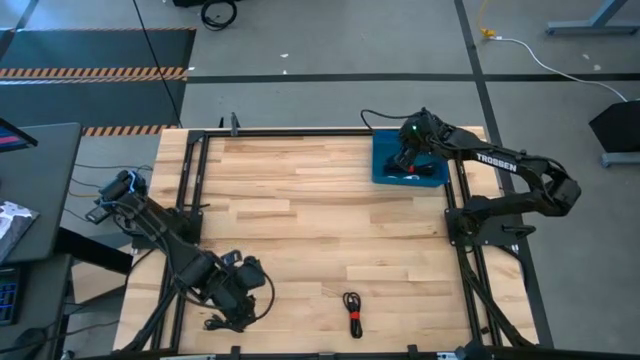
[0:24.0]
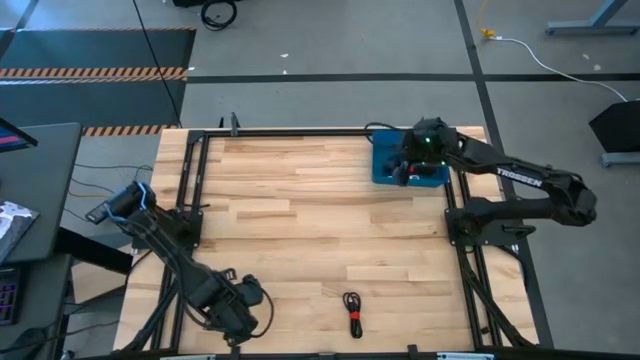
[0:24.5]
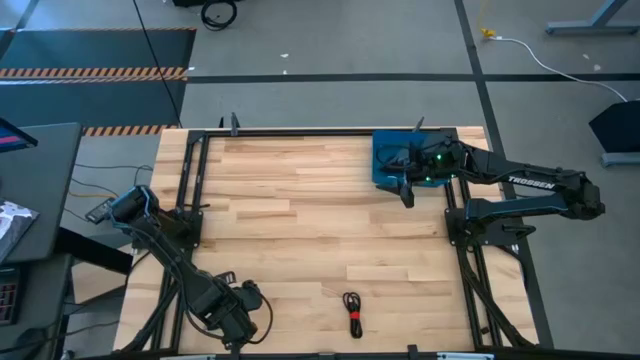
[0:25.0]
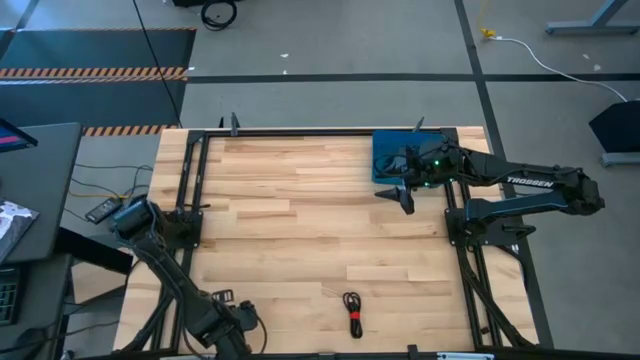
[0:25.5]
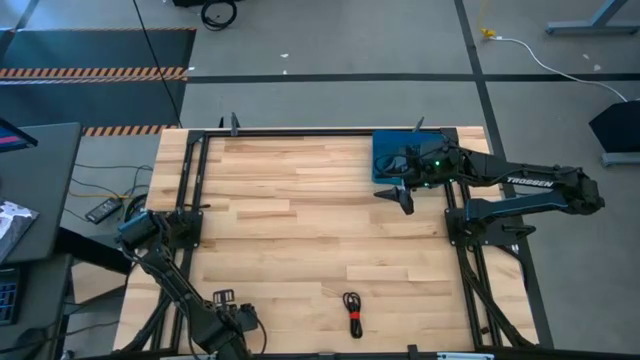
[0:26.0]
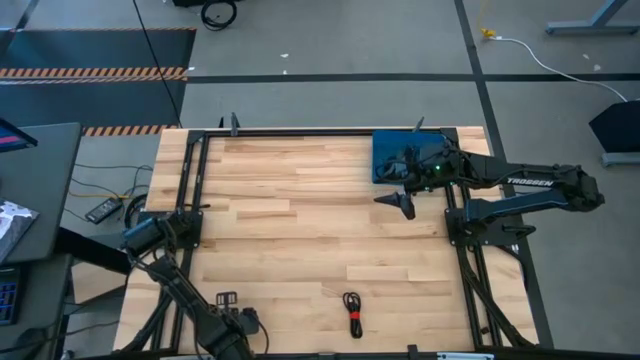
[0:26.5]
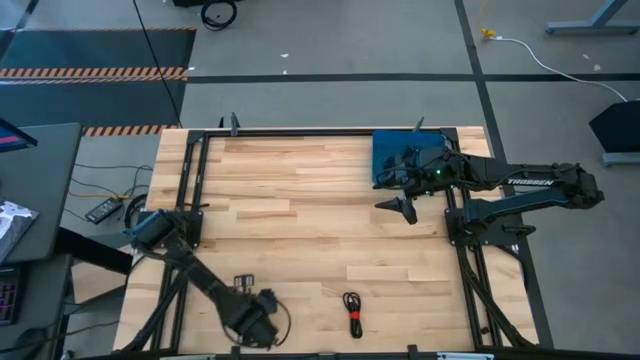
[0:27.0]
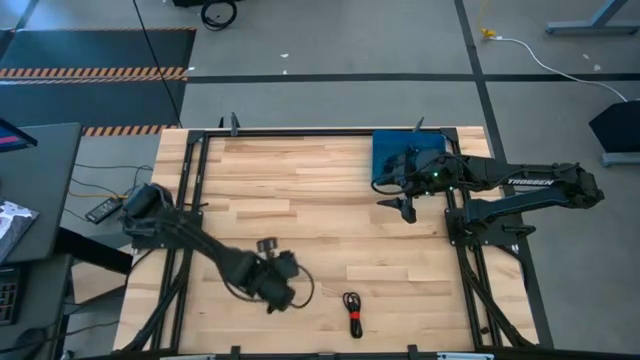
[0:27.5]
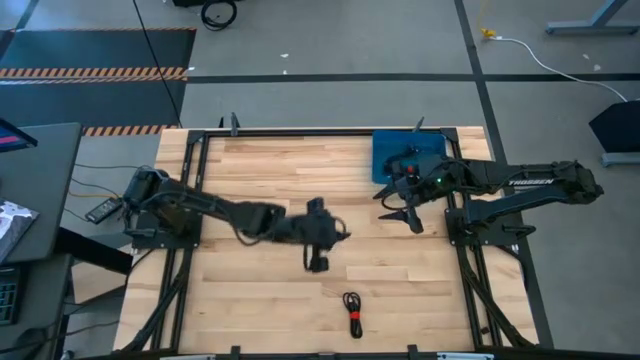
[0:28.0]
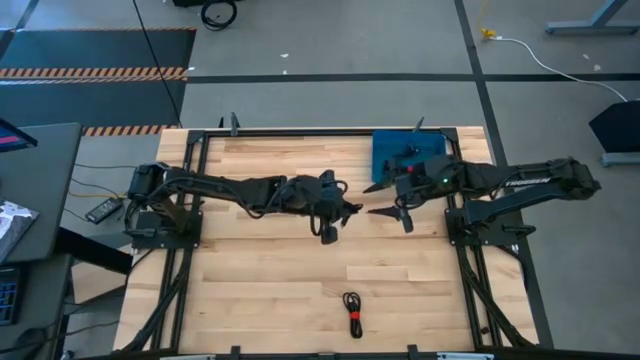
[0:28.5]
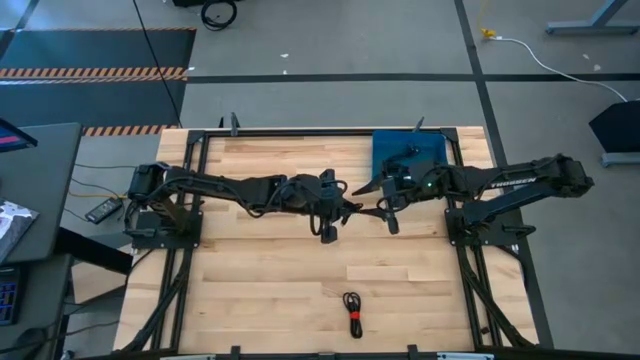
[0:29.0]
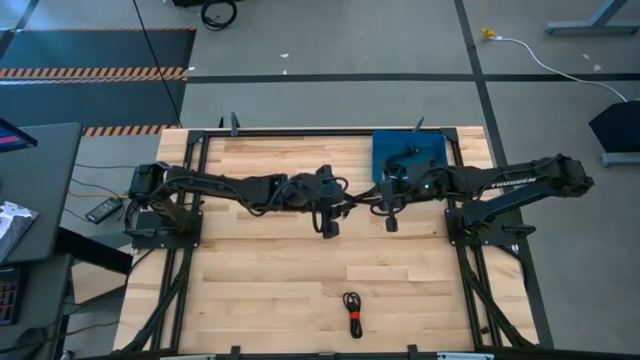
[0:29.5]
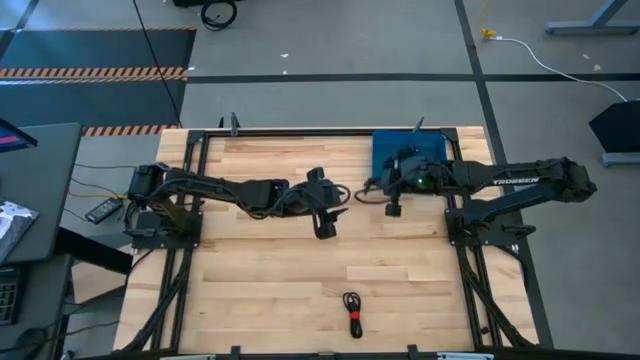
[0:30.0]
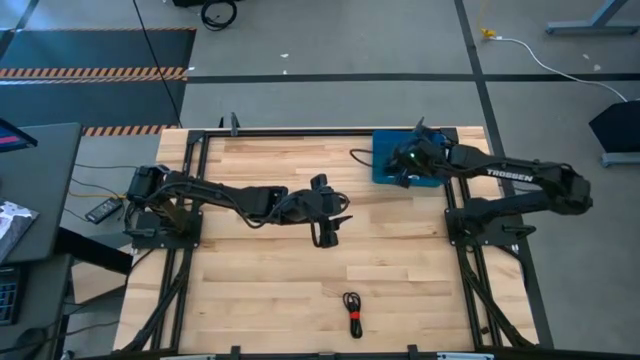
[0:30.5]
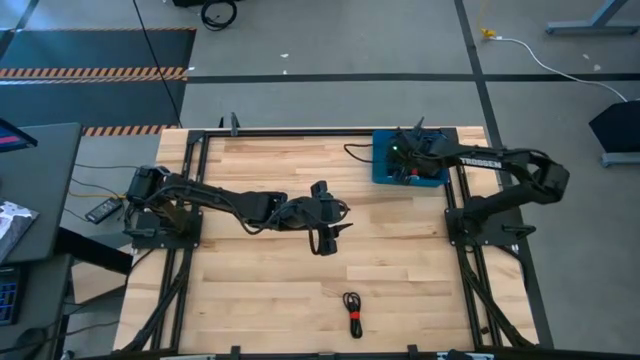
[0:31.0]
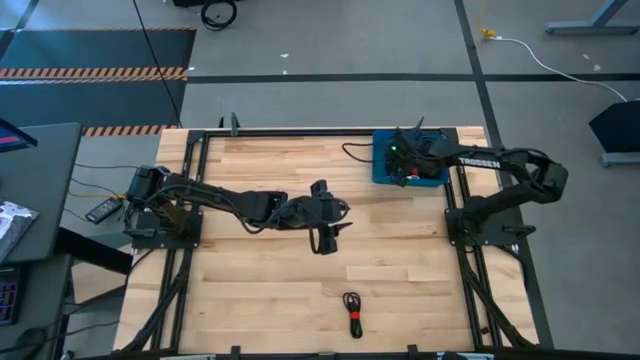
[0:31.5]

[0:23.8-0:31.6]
Task: Pick and place USB-C Cables
Put the black charger cable into the blue bin

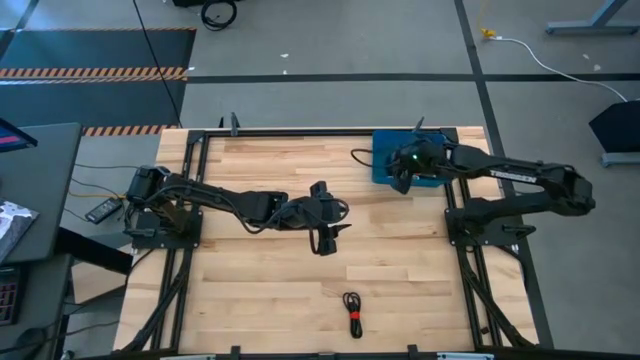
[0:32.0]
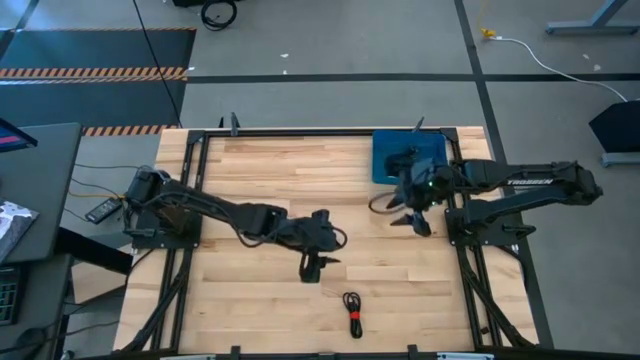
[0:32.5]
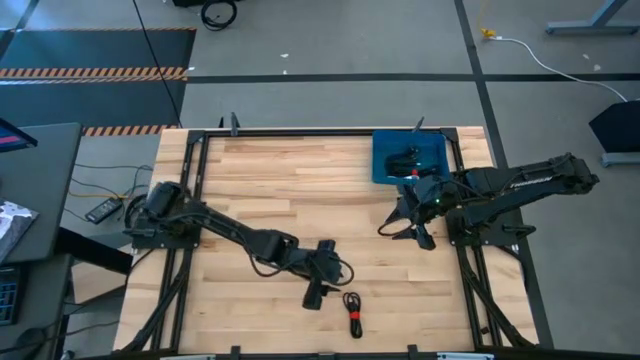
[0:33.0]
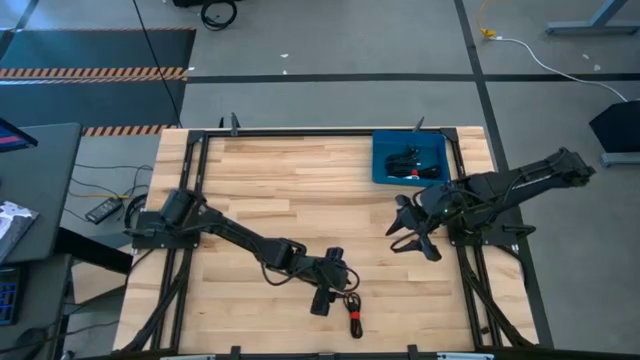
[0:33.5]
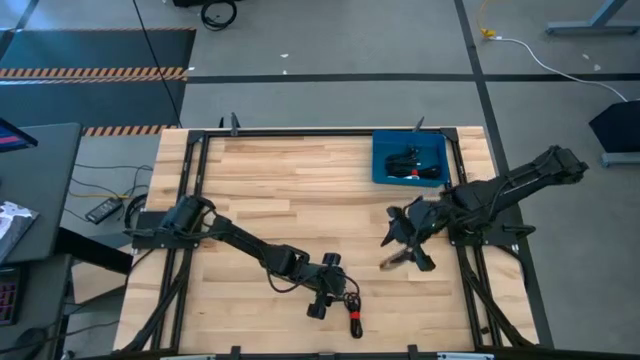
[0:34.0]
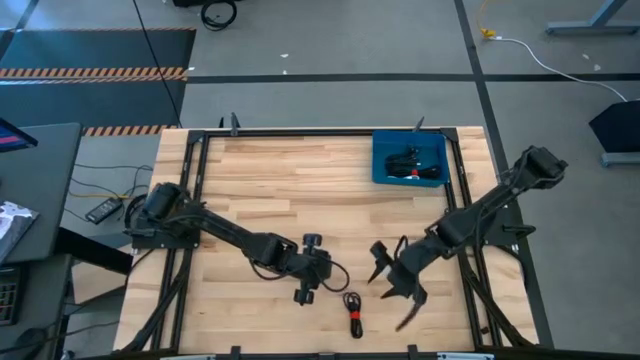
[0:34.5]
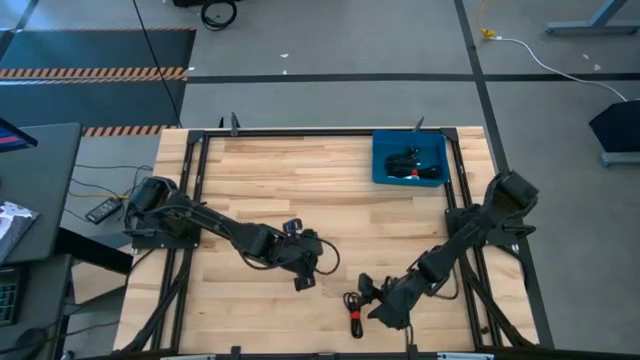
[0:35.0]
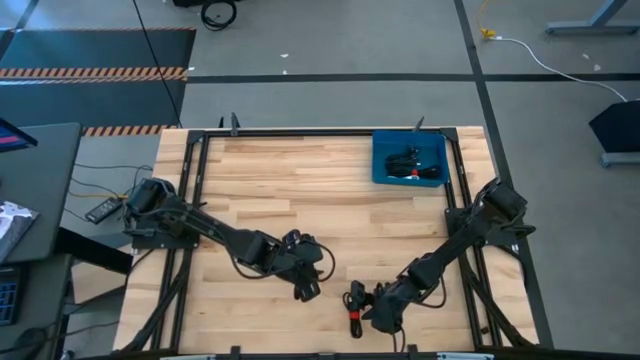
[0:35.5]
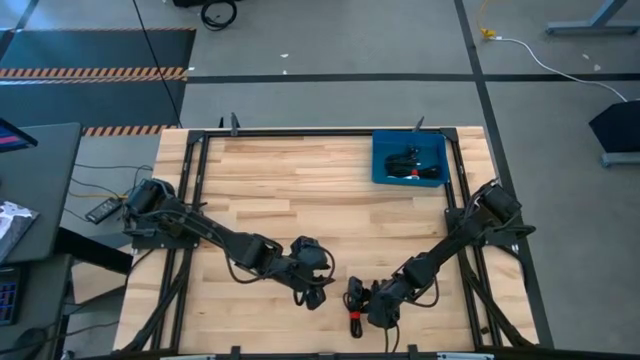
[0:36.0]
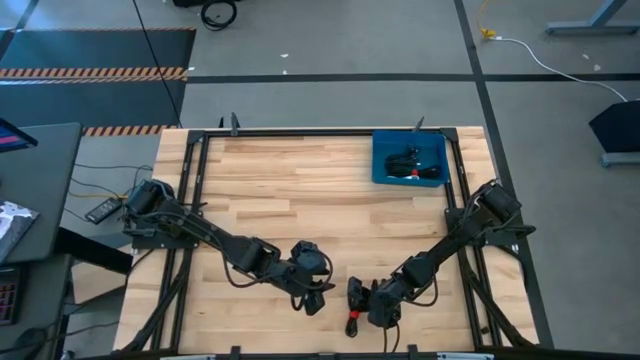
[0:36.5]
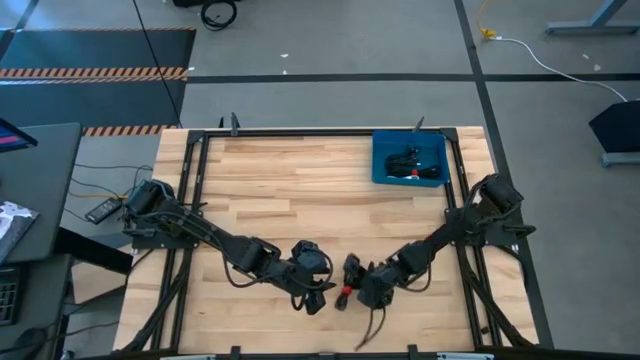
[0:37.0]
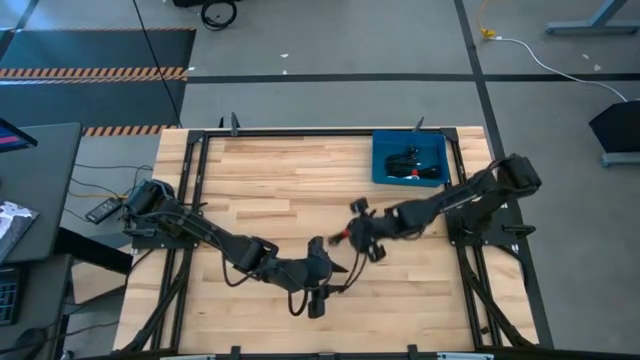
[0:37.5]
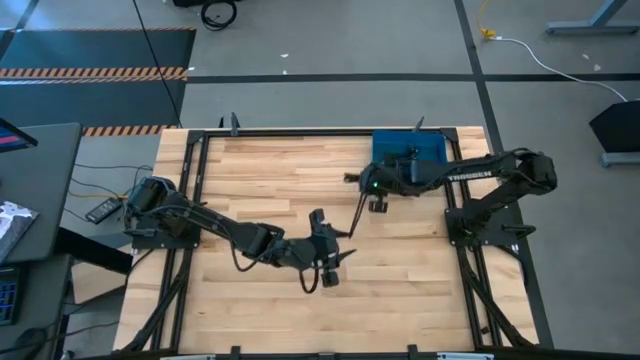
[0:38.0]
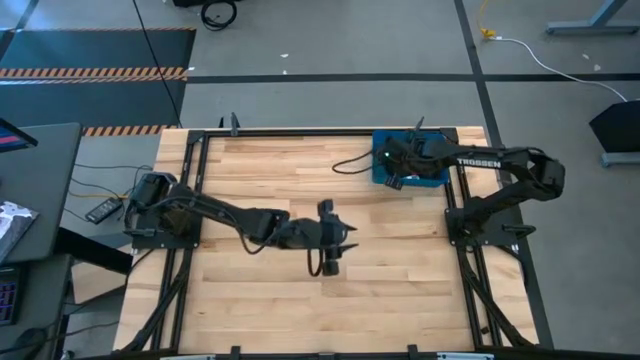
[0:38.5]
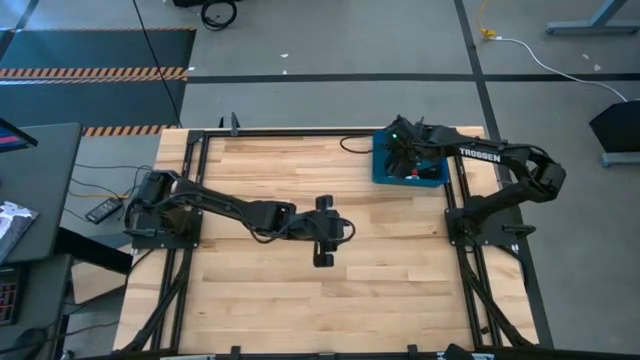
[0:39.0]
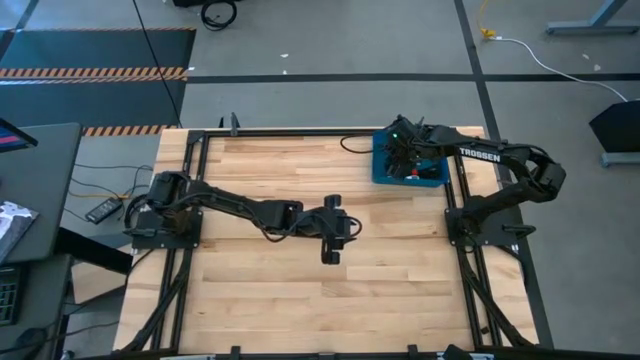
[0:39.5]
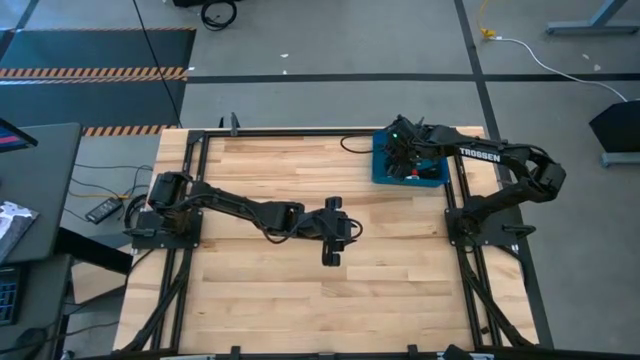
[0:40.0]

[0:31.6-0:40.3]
Put the black charger cable into the blue bin

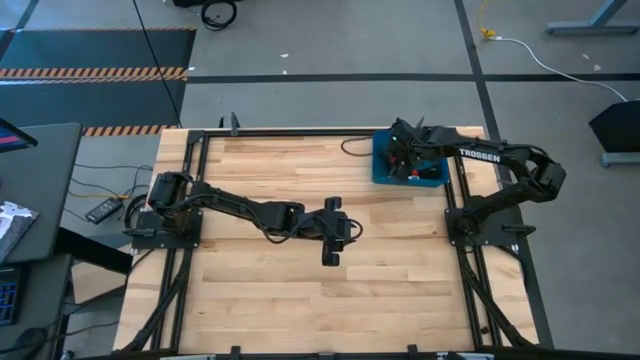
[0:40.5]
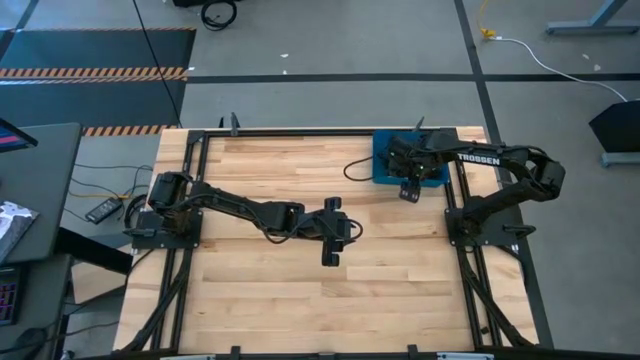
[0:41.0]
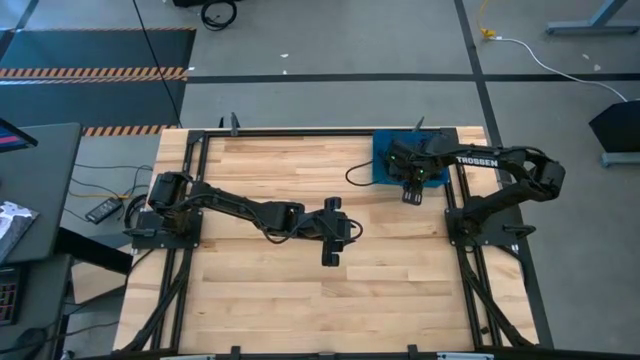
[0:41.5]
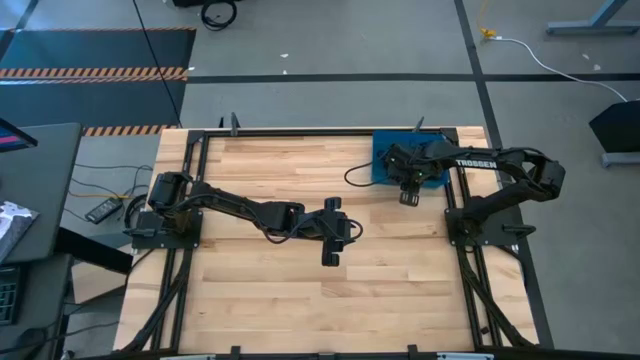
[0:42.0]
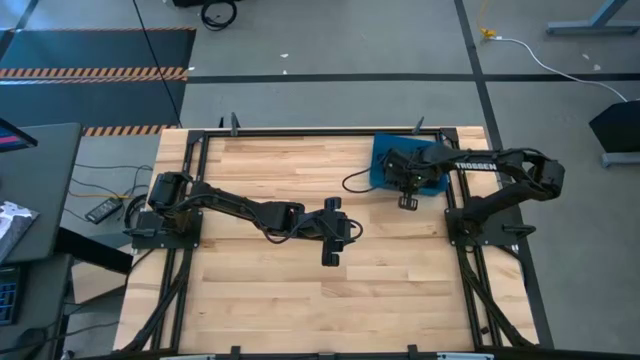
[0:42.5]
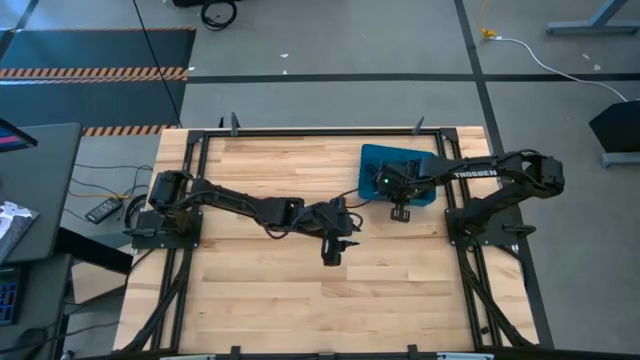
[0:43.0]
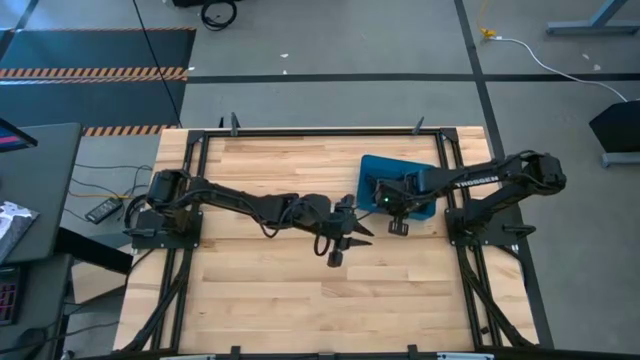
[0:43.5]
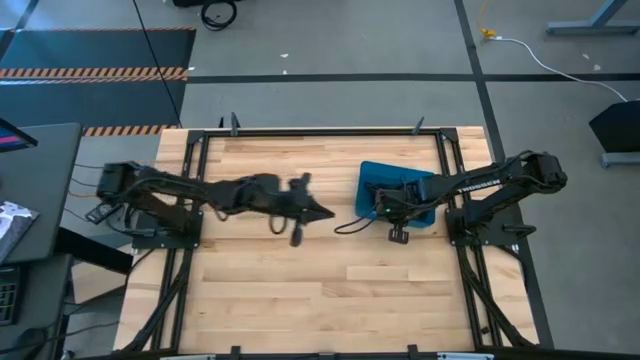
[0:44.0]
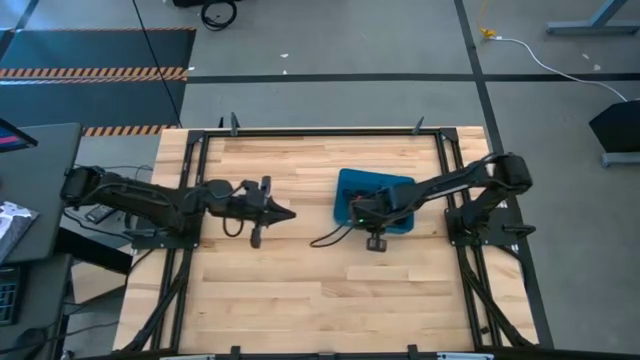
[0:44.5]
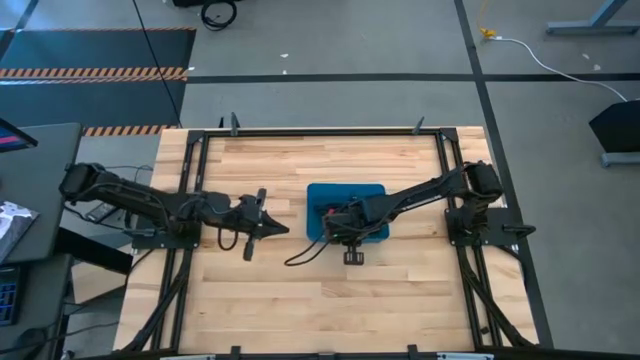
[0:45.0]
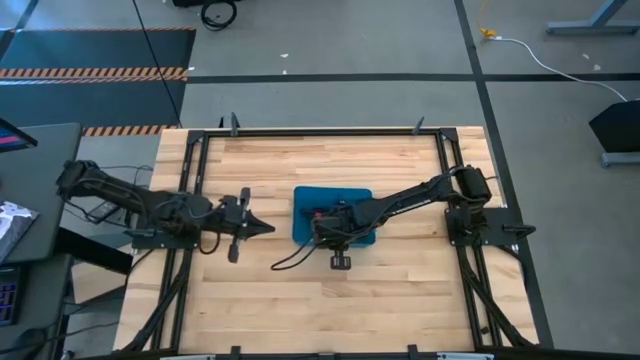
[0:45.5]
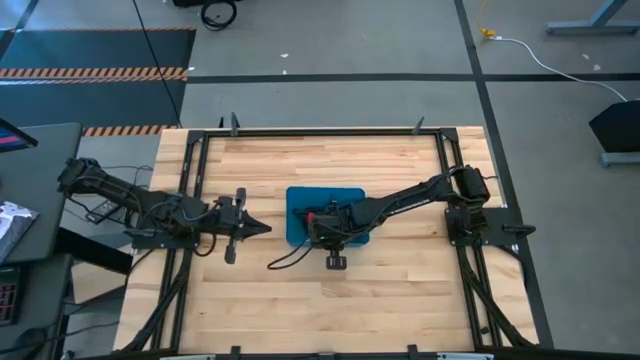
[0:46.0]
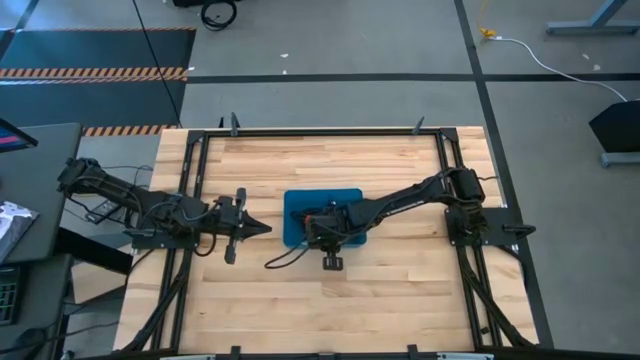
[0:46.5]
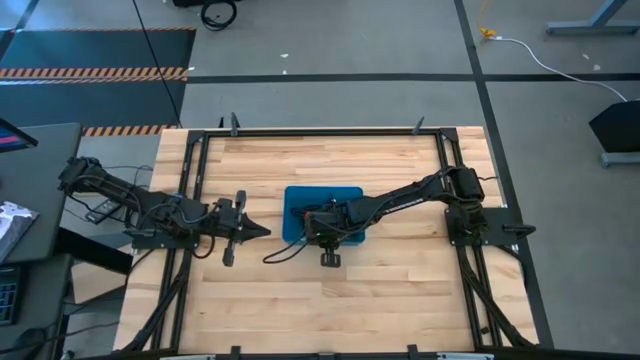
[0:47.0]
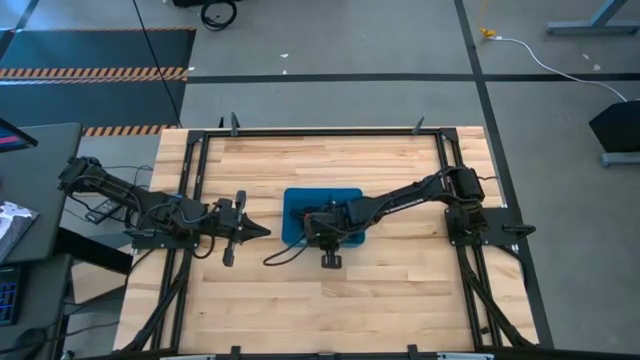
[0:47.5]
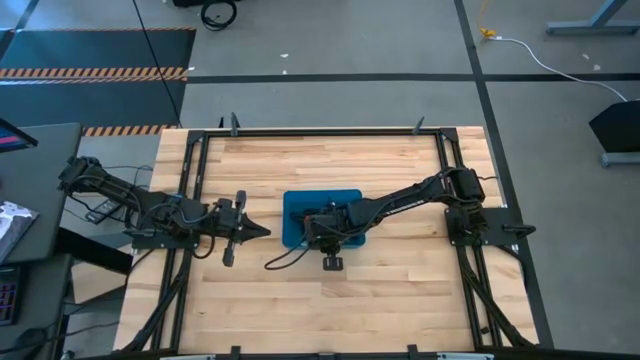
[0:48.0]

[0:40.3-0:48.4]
Move the blue bin to the middle of the table
